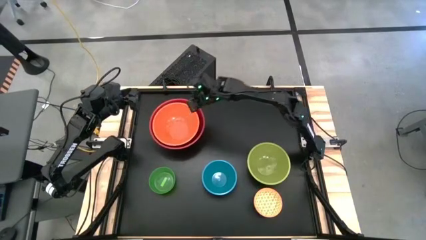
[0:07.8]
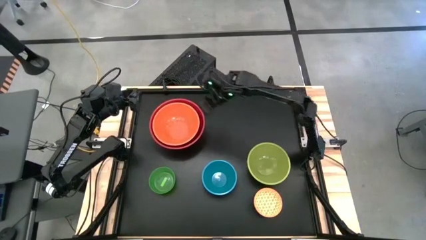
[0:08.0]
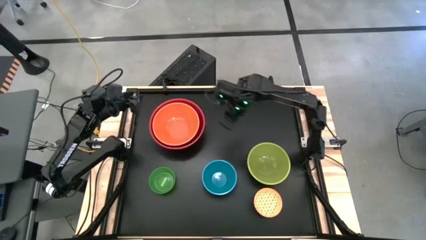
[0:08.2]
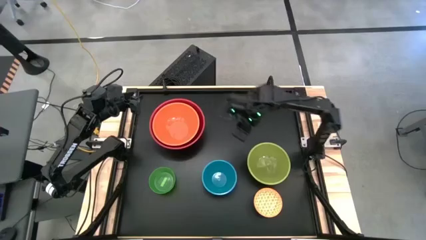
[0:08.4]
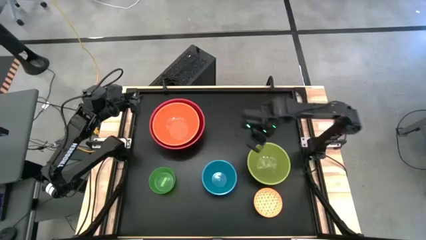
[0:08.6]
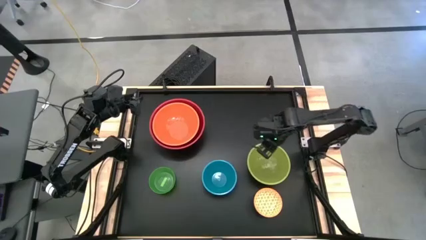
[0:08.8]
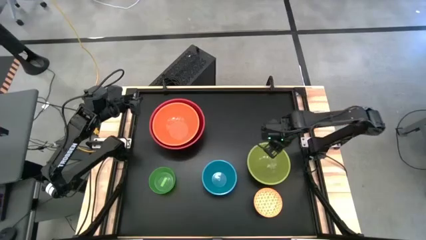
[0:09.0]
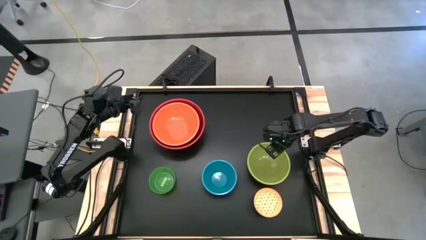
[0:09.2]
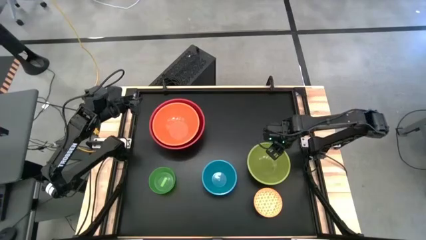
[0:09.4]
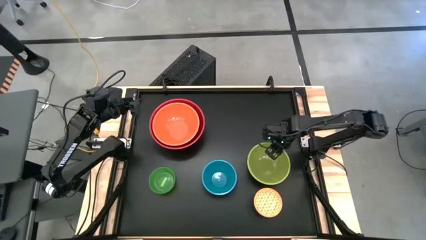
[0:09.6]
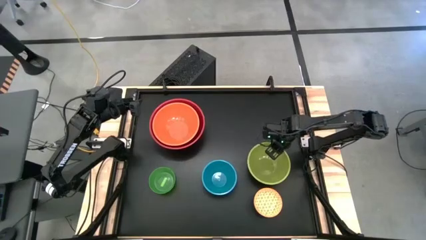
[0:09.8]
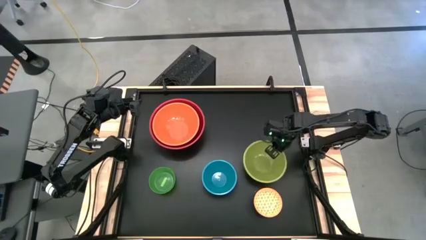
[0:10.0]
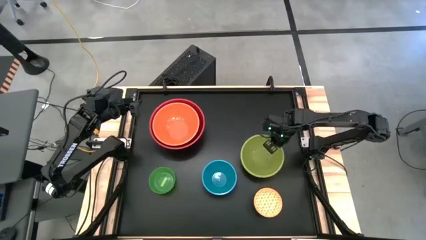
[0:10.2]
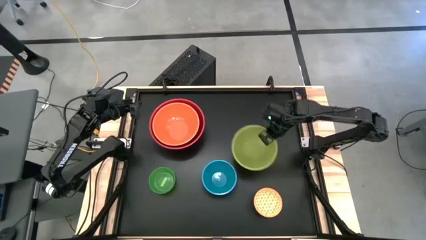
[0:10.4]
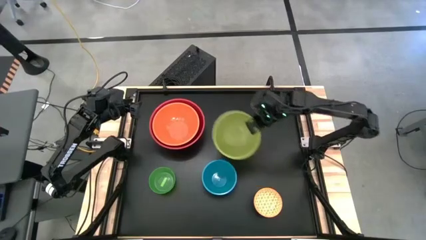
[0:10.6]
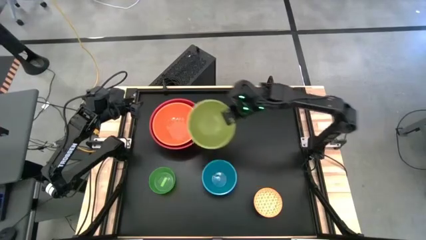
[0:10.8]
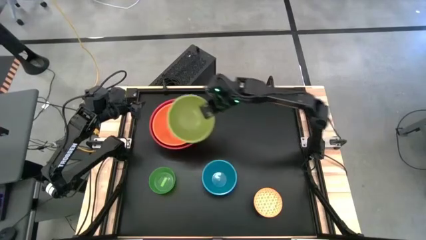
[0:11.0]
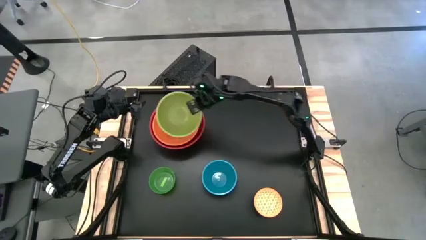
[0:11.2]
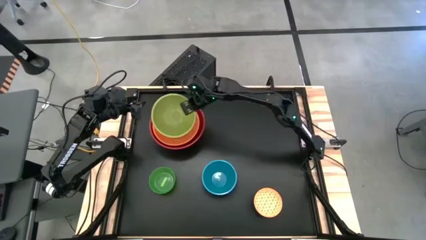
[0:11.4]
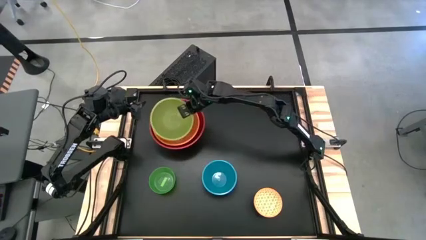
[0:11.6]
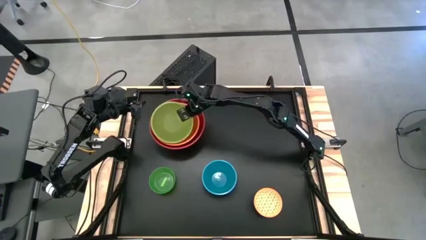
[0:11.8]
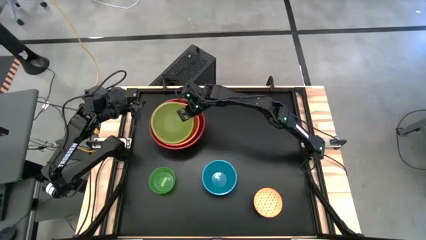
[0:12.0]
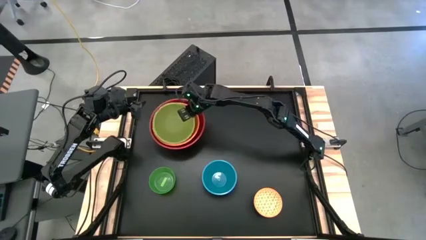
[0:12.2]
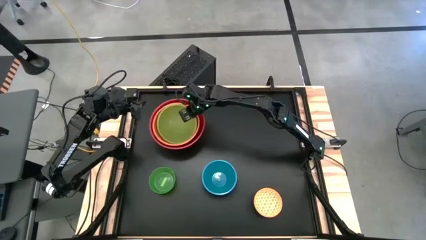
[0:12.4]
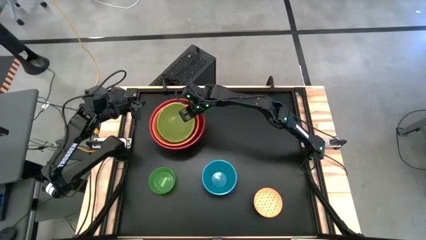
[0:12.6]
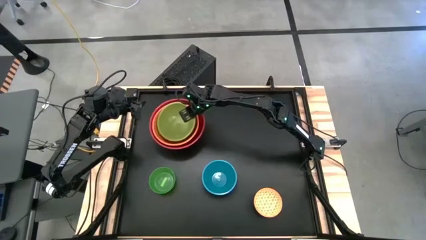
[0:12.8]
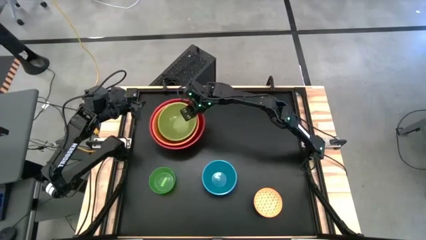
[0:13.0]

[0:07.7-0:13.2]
Stack the right green bowl on top of the orange bowl

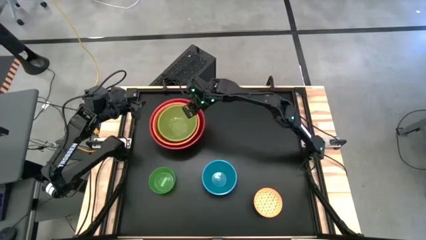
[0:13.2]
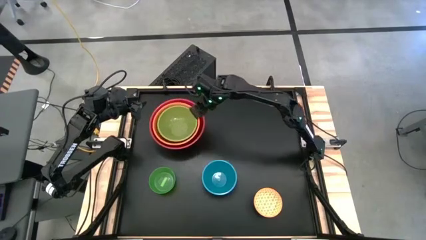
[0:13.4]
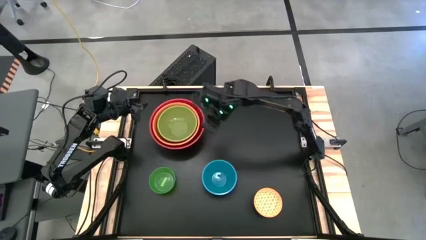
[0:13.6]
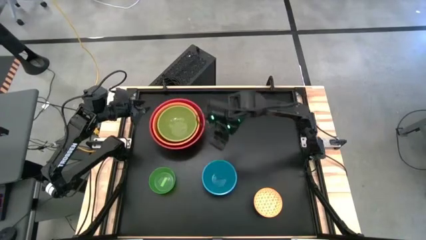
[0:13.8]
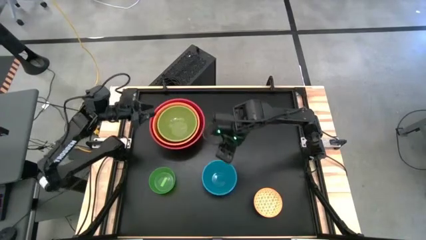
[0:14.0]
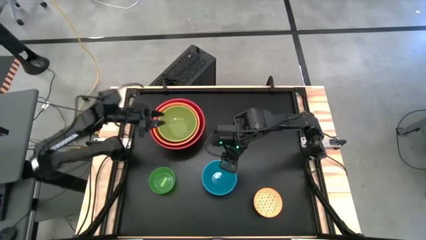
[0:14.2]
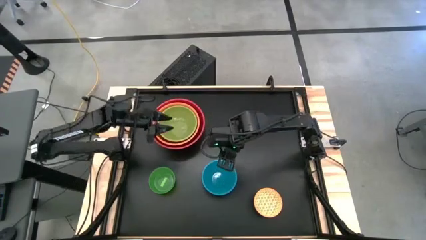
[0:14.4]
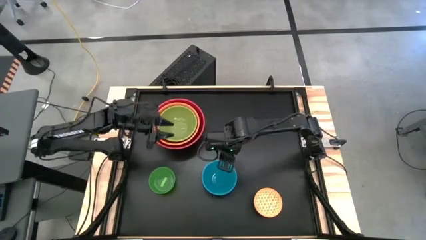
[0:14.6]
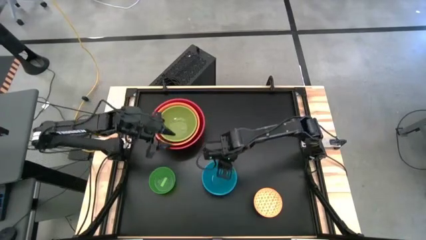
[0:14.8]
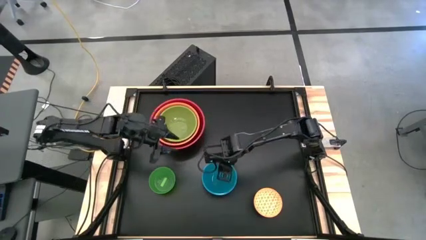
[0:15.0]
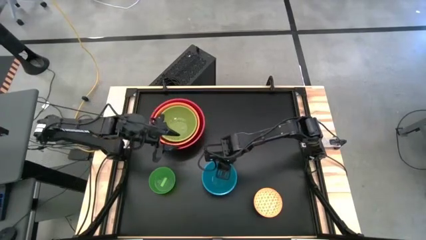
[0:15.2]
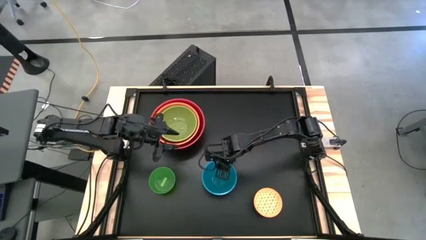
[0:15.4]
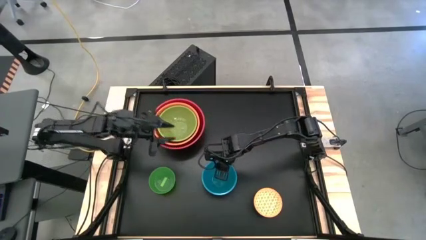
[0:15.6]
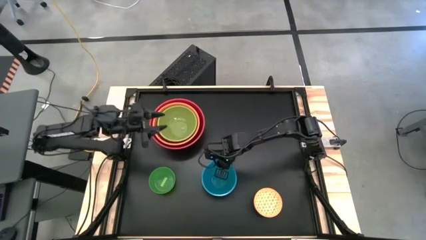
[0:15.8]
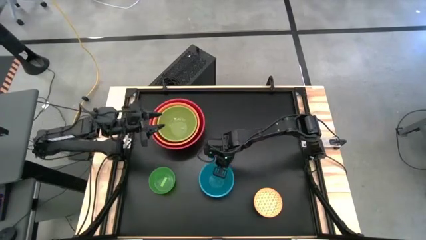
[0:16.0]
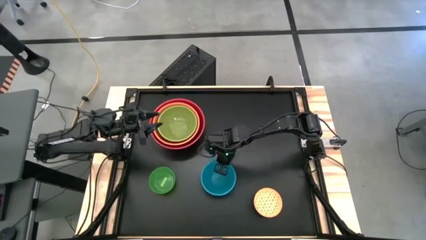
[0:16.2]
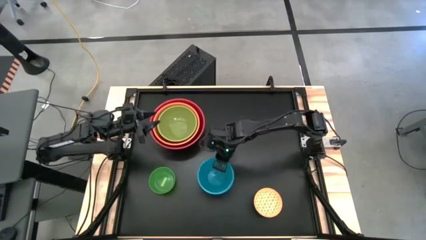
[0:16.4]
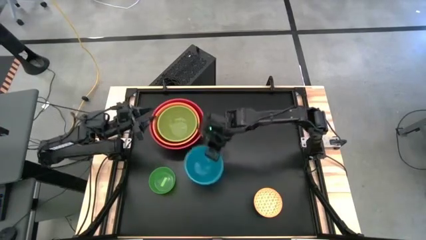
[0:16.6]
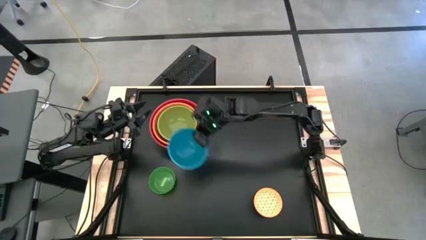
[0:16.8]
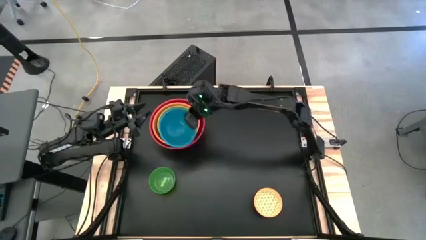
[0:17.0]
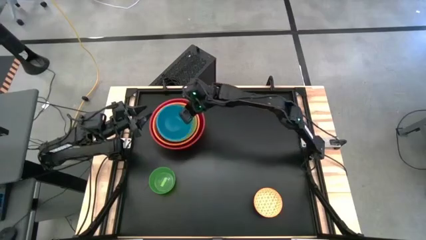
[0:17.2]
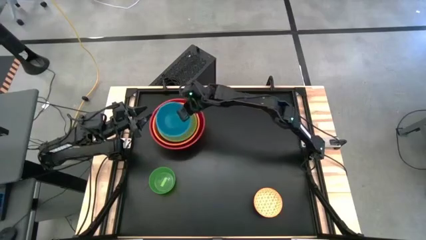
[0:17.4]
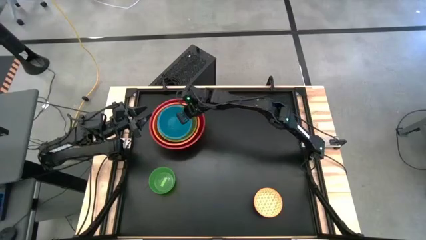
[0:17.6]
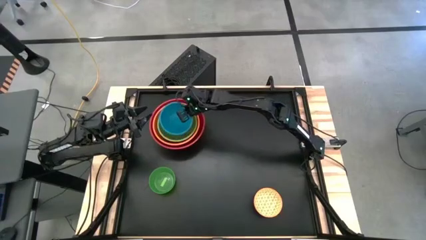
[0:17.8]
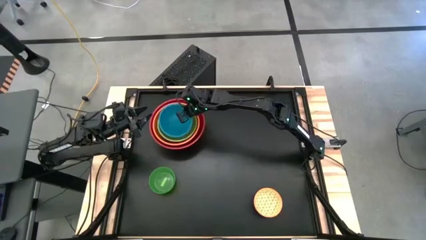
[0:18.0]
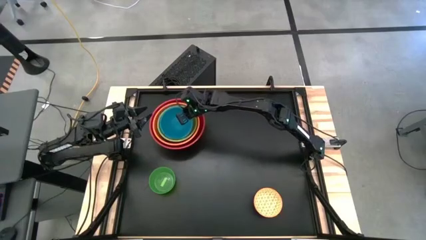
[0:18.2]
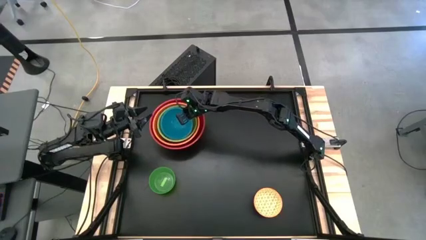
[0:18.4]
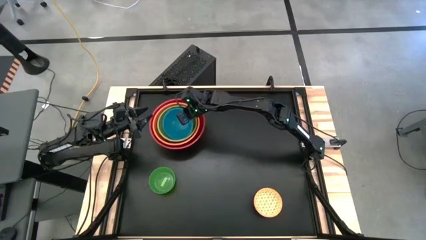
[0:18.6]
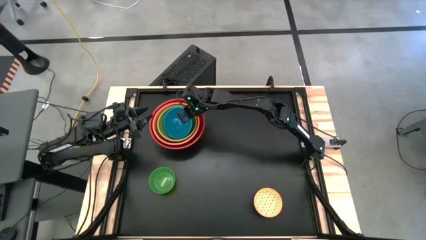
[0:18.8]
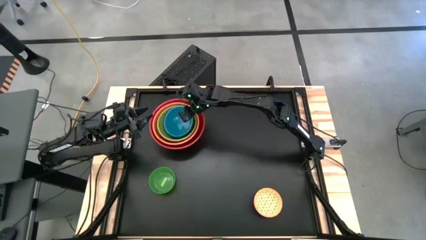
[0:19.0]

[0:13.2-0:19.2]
Stack the blue bowl on top of the green bowl

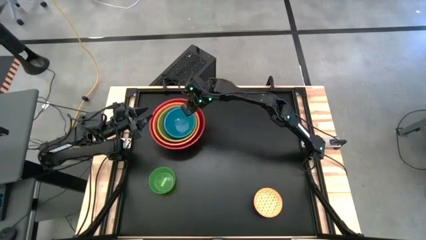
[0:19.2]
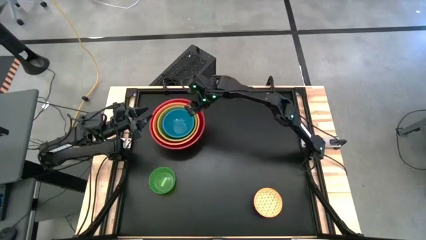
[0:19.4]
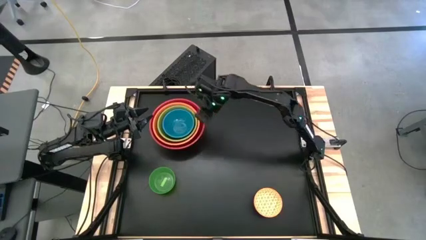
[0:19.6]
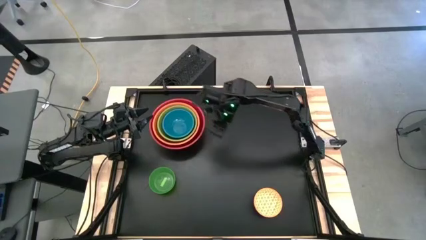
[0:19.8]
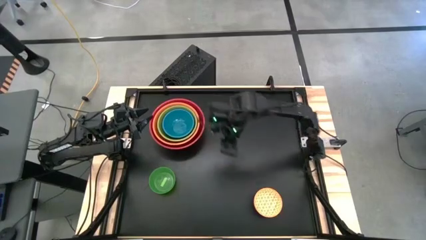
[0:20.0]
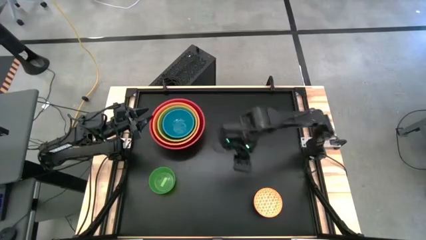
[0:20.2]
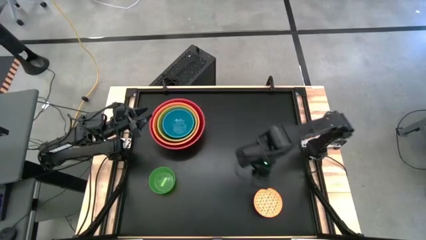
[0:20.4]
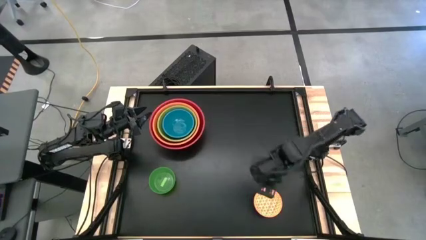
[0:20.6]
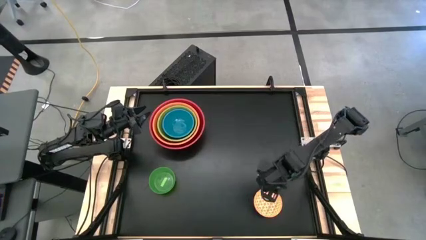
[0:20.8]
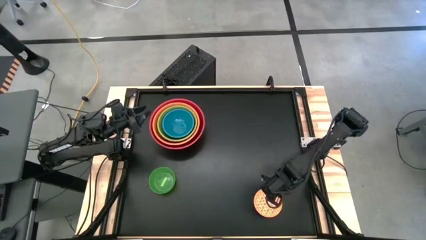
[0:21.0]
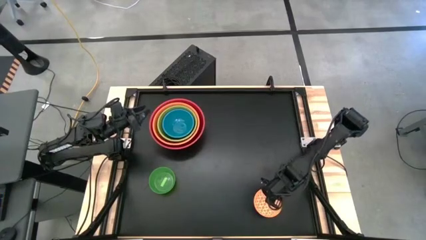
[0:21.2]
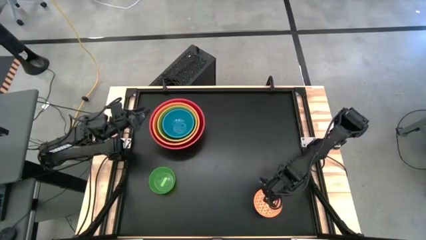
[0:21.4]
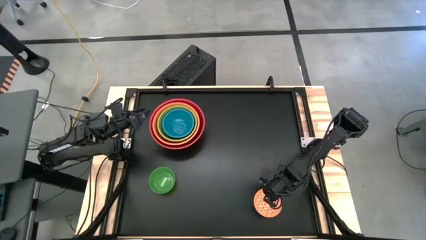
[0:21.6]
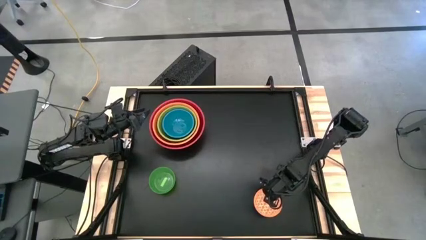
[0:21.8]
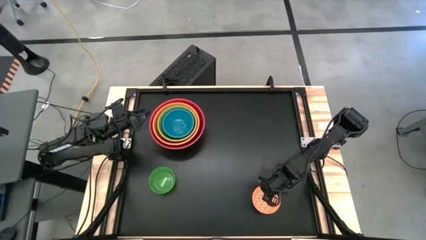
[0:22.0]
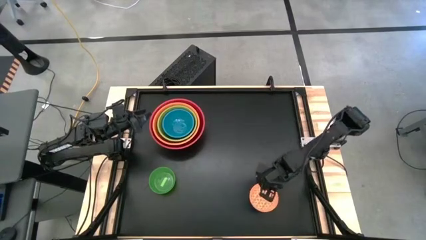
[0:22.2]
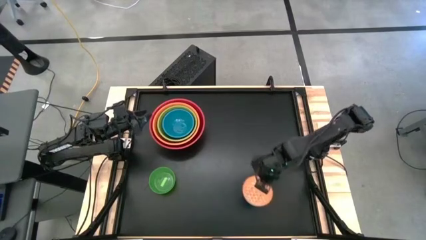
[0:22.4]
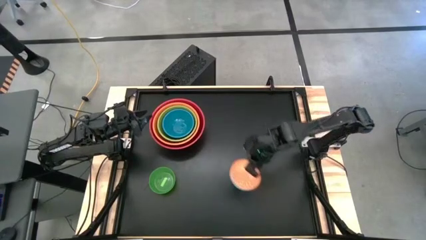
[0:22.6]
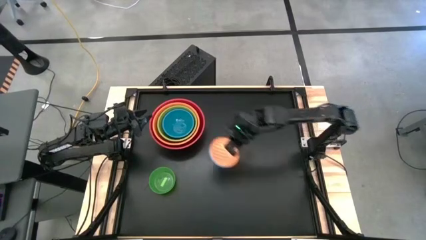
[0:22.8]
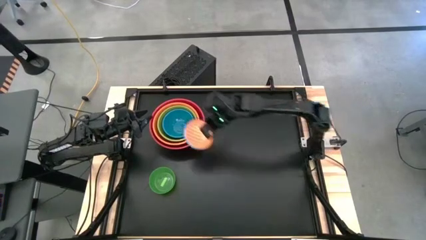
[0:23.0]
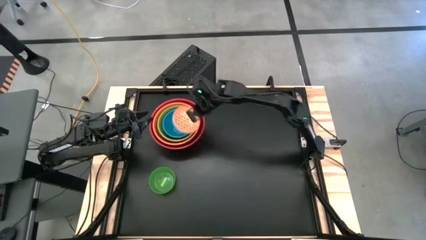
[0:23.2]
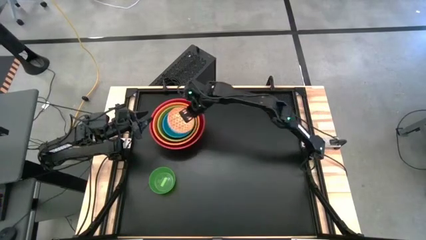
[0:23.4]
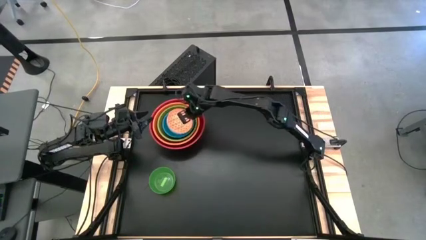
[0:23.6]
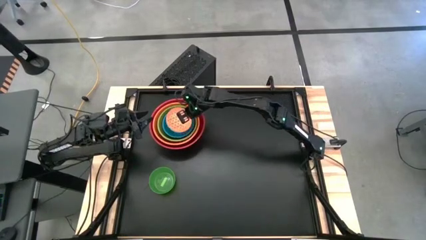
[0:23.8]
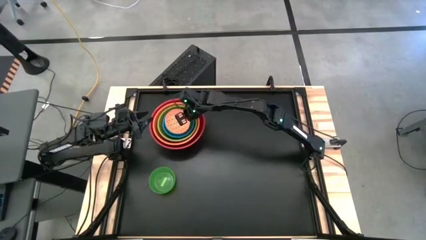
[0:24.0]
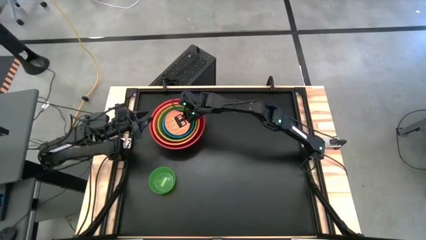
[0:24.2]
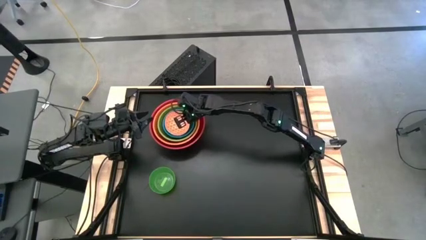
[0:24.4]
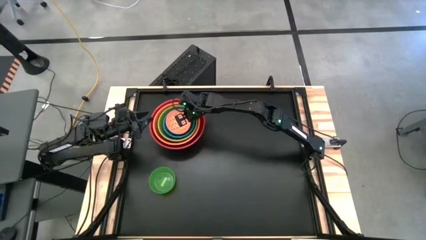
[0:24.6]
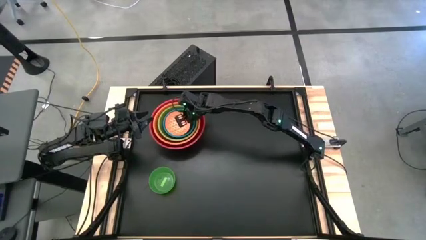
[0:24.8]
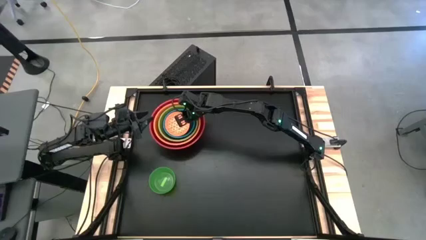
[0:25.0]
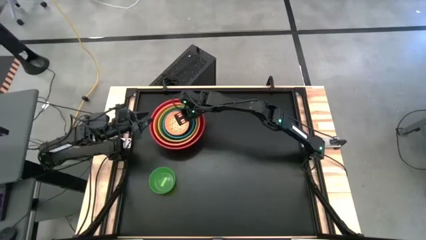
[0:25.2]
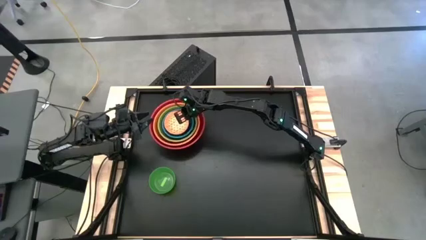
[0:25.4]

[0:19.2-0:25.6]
Stack the orange and blue bowl on top of the blue bowl
